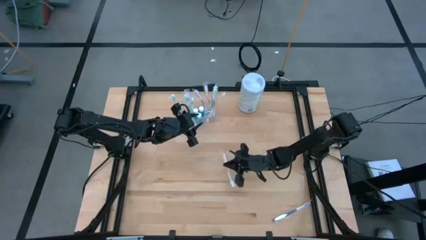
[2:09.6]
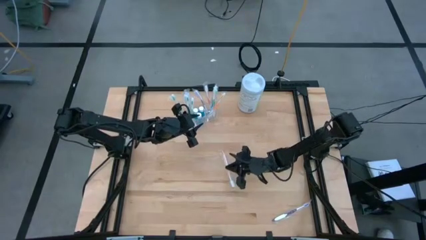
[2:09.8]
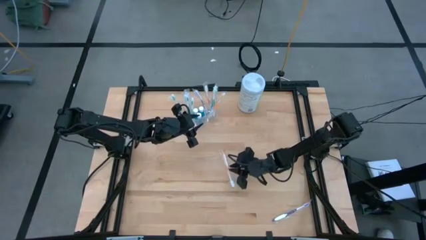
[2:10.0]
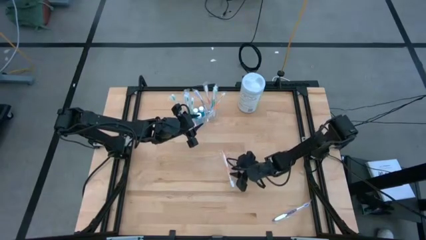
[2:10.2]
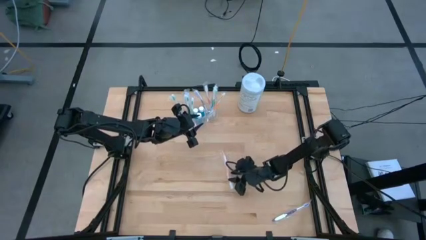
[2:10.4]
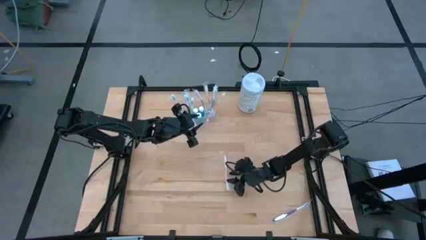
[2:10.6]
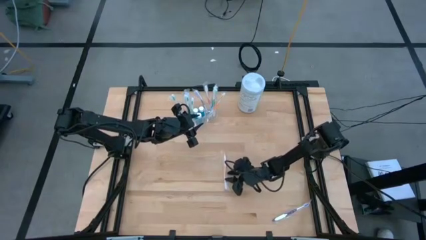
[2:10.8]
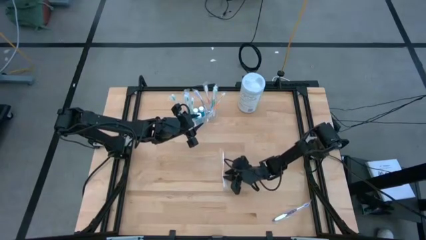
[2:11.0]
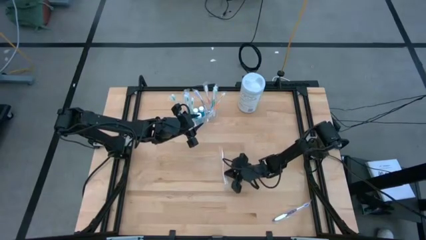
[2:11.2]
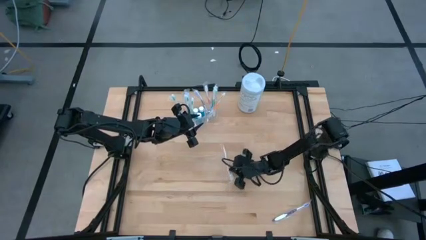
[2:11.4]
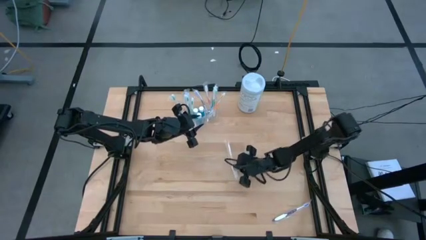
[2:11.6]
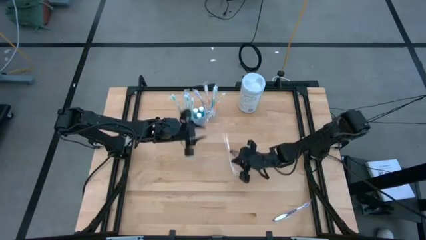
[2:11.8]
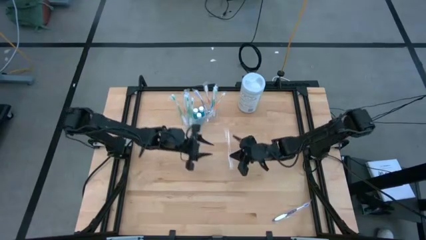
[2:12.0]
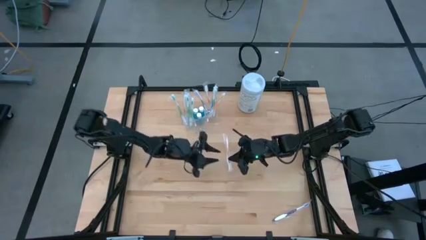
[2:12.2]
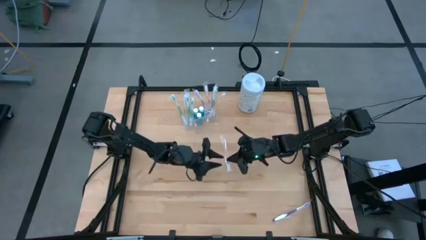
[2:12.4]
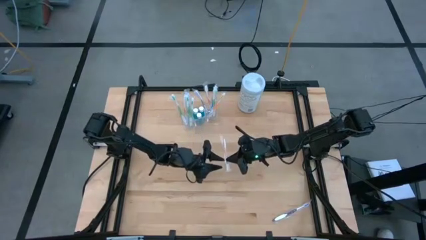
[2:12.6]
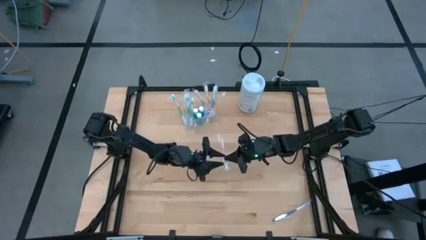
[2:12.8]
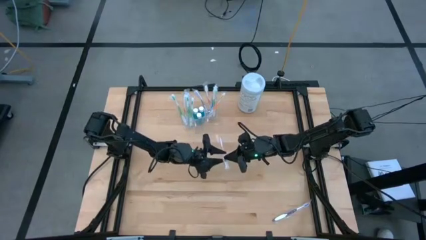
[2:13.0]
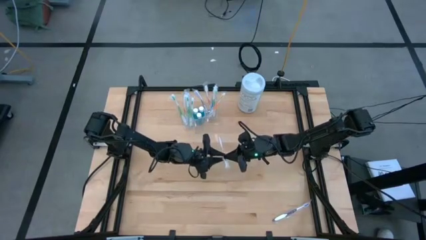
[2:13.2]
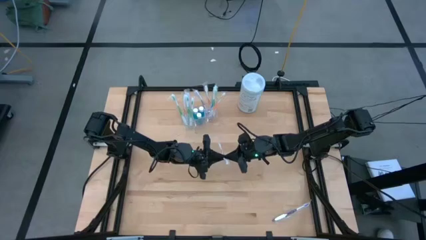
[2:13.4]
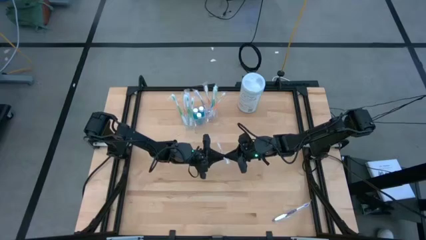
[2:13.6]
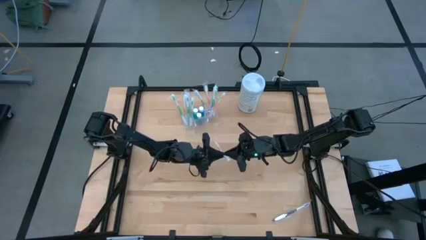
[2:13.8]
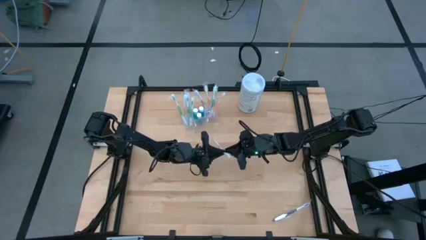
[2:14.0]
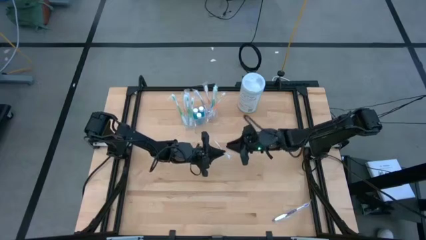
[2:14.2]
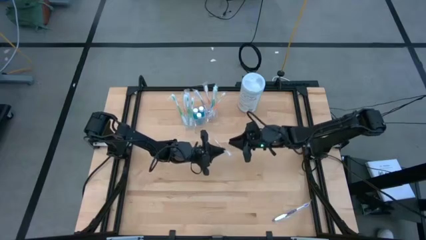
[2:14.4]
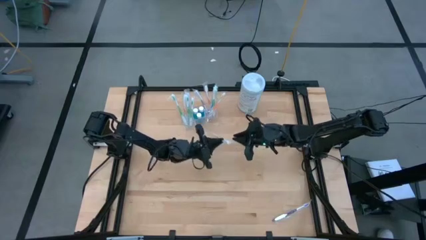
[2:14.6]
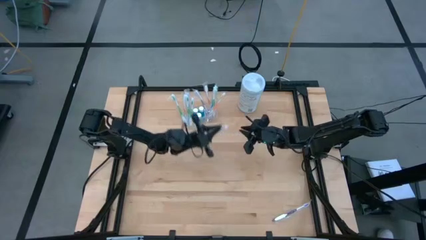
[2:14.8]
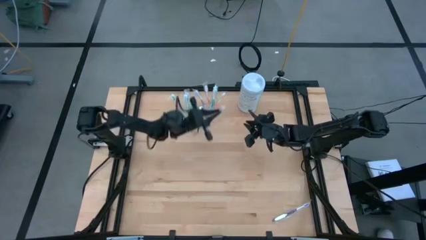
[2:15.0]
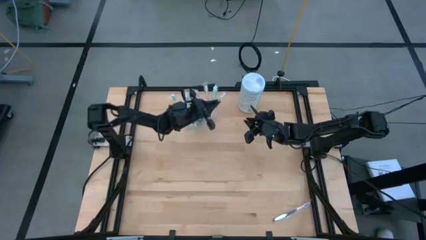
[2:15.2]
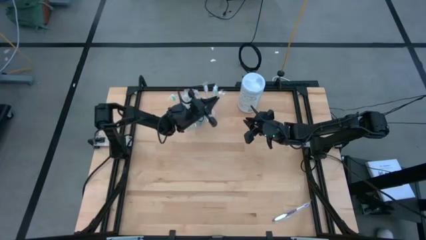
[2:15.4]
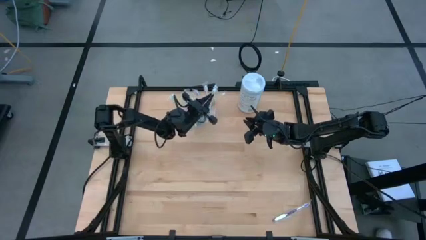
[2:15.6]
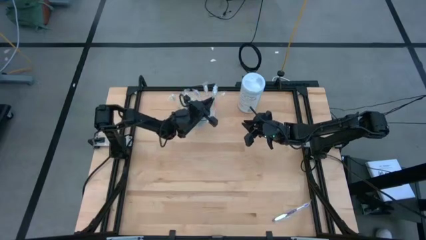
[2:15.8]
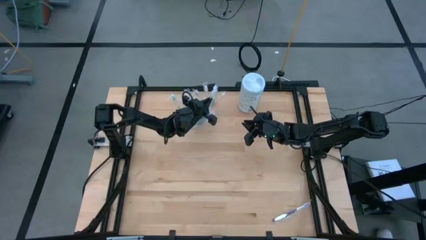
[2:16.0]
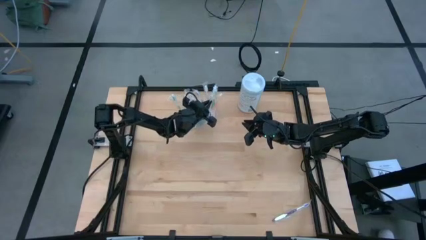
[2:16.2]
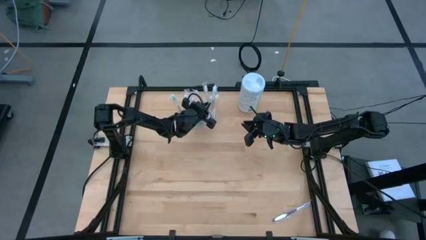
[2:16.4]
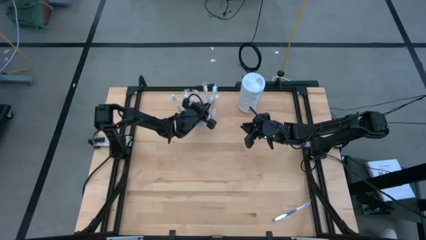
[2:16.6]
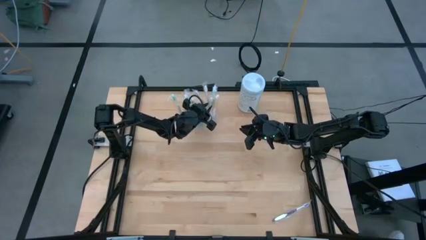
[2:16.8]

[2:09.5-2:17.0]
Task: Pick & Place toothbrushing station
Put the orange toothbrush into the transparent organizer

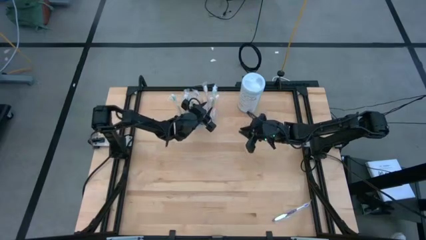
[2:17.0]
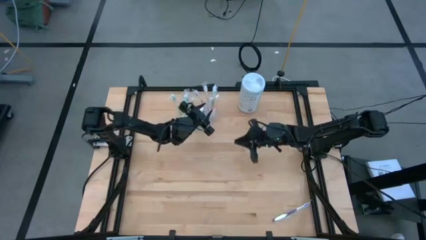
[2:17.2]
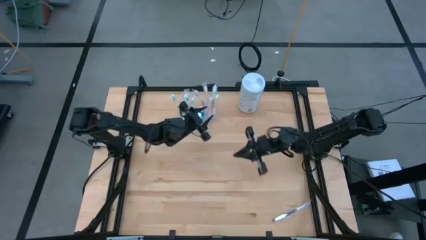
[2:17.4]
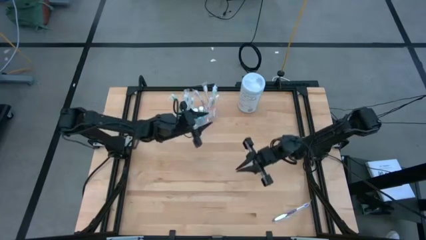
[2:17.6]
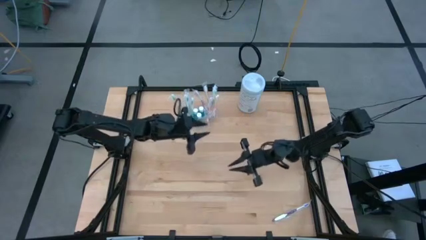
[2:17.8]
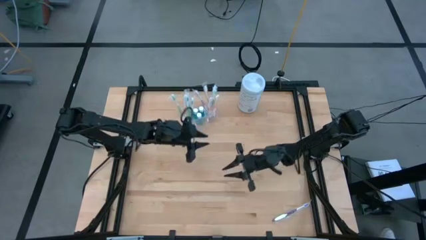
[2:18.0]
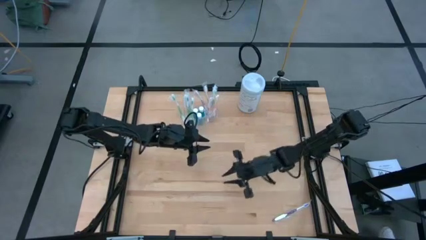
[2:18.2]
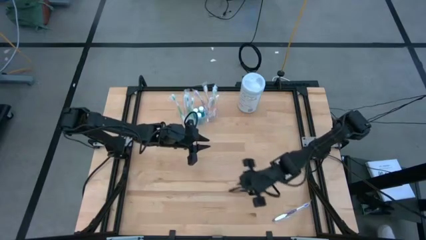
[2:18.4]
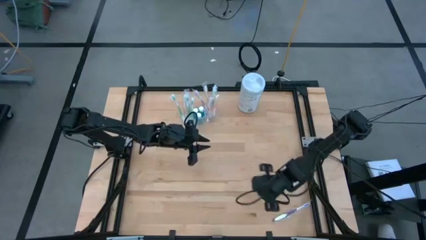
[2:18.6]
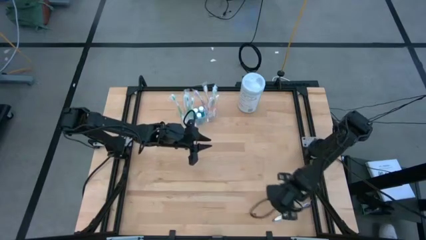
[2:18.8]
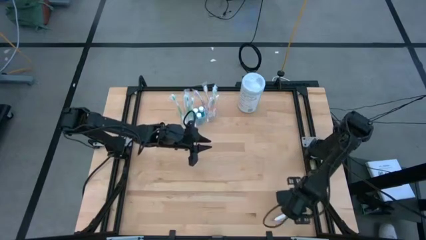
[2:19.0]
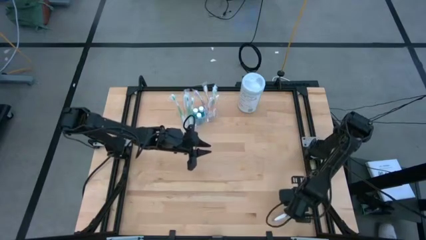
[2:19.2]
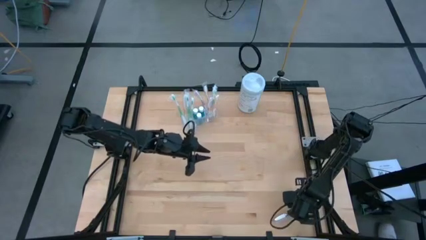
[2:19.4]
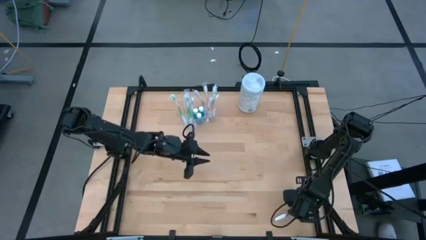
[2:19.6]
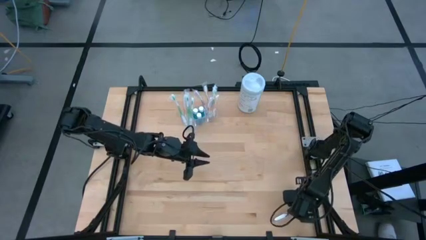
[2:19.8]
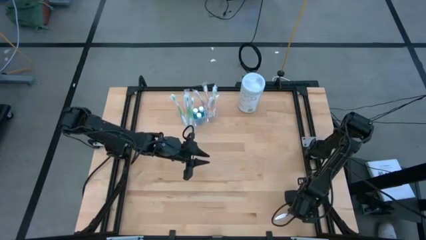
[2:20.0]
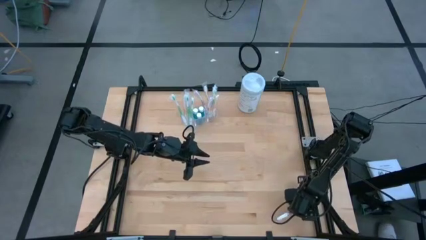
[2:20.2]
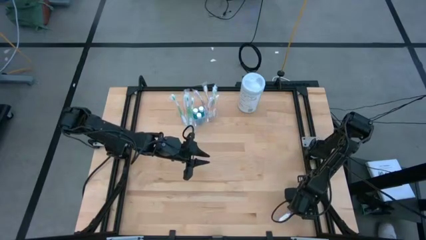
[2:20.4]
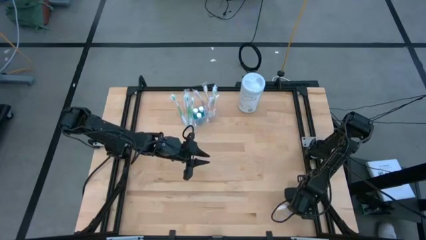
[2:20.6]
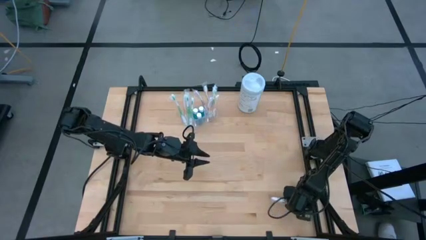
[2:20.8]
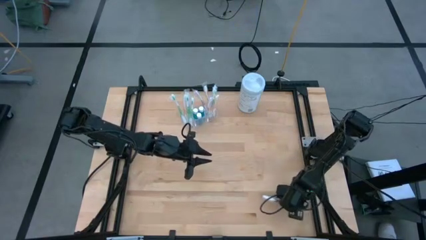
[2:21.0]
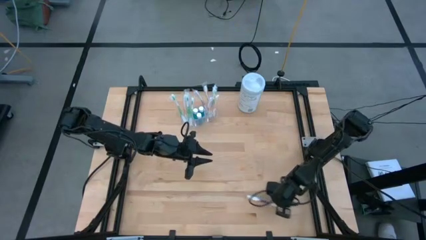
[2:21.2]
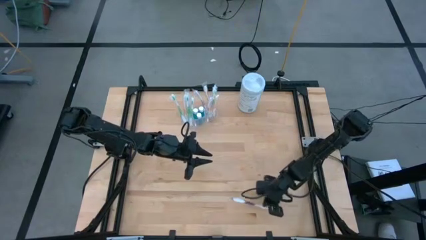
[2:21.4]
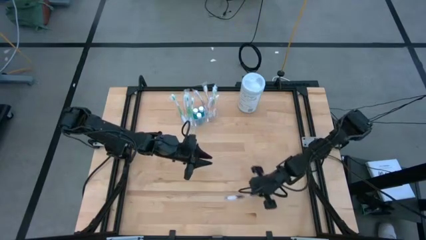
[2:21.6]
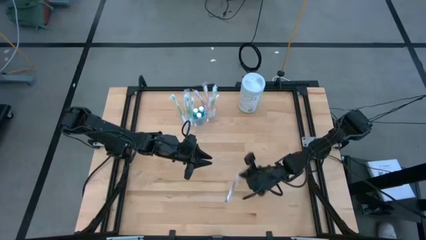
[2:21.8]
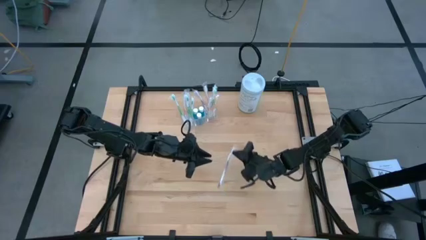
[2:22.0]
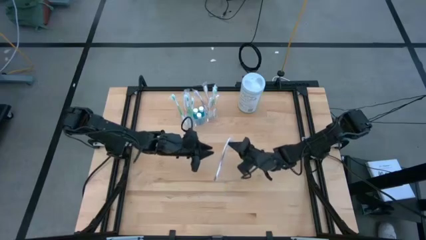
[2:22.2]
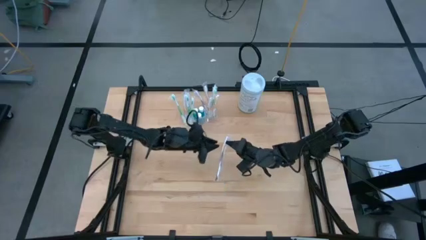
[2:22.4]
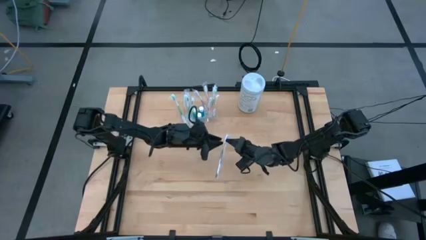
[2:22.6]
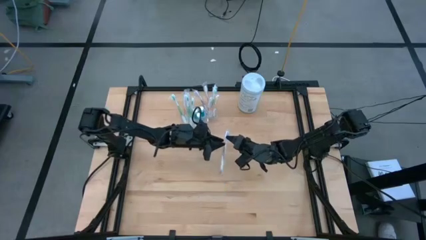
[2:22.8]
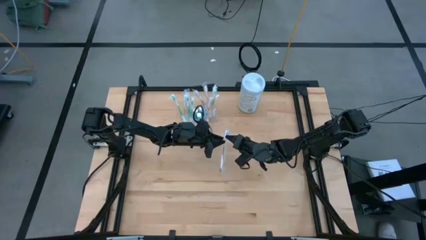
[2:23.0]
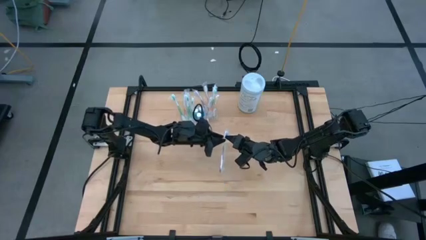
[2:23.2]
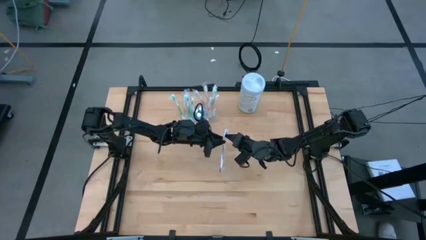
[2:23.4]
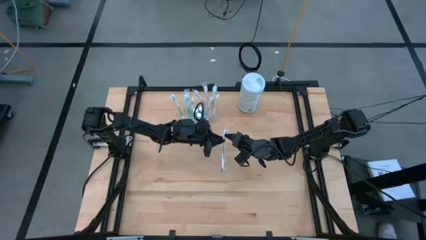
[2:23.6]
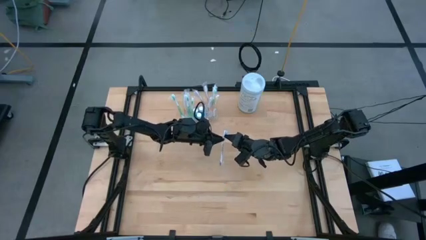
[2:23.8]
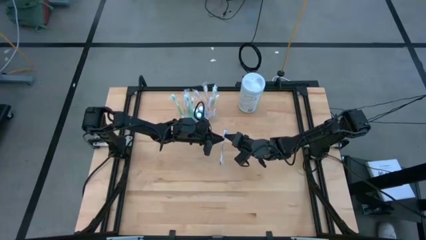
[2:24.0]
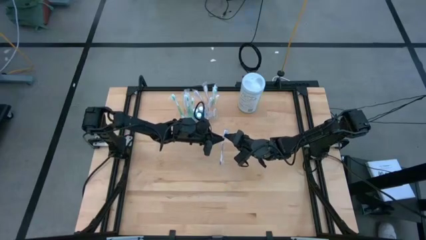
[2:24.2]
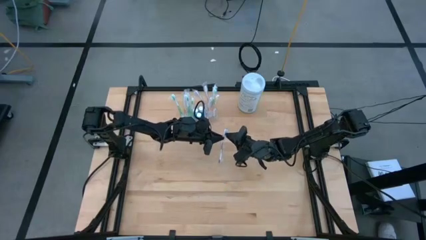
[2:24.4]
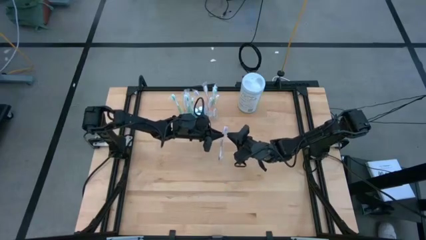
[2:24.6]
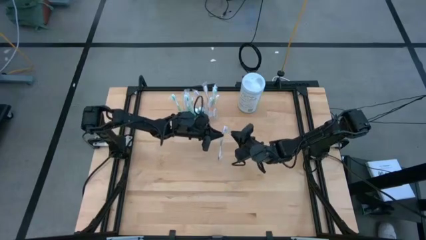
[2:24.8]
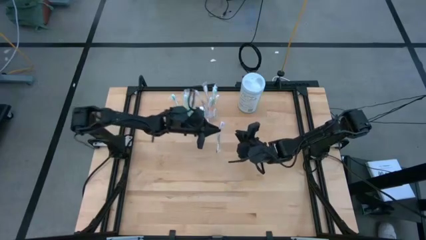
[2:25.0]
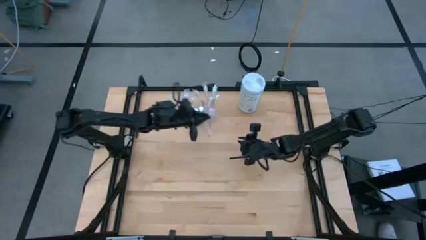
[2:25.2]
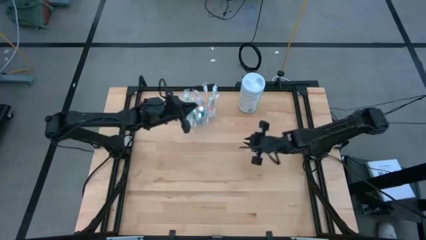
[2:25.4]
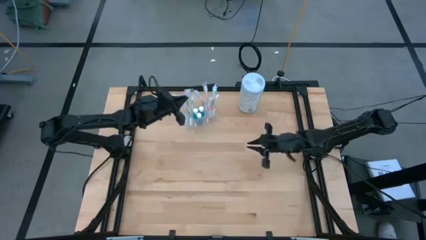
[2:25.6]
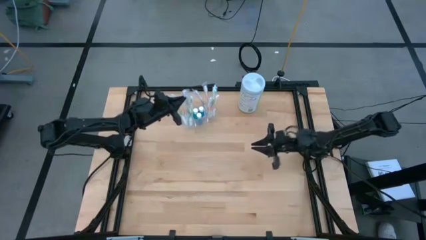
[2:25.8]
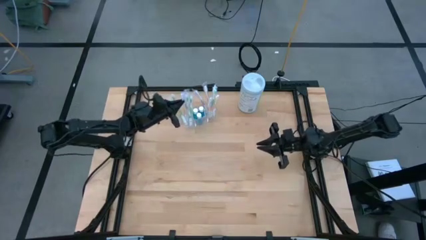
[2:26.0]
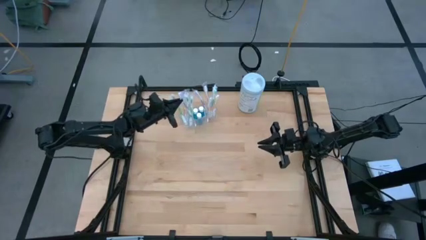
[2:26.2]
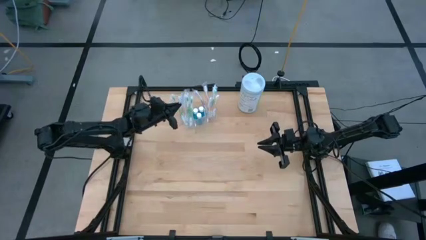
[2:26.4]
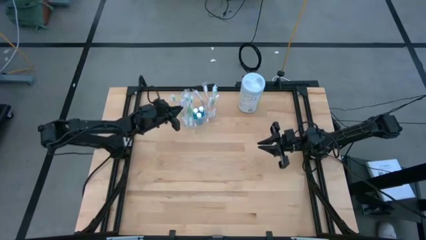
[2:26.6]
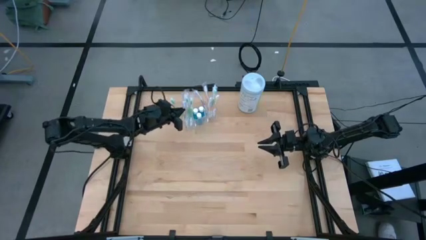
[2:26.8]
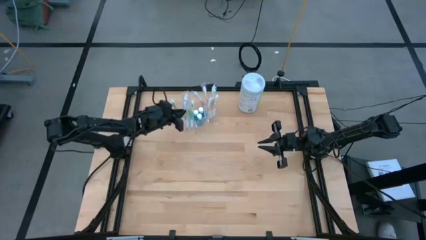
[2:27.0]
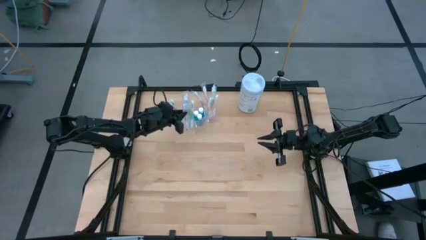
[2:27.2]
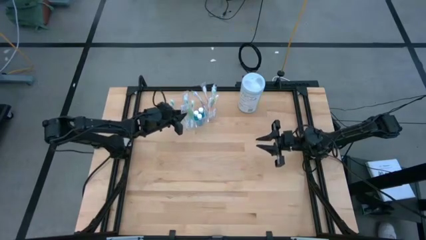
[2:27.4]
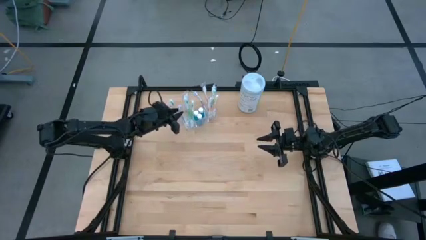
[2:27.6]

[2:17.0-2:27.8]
Put the purple toothbrush into the transparent organizer
